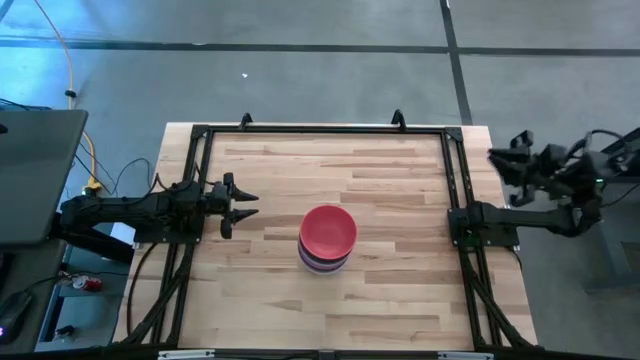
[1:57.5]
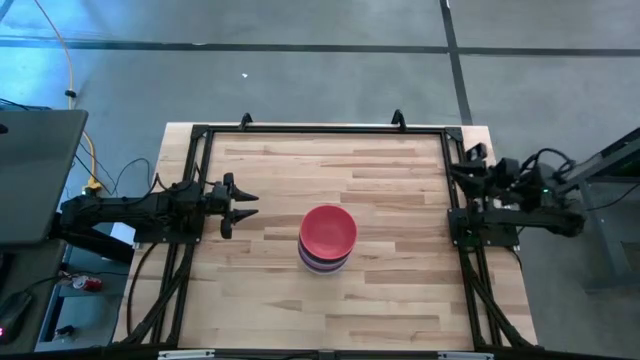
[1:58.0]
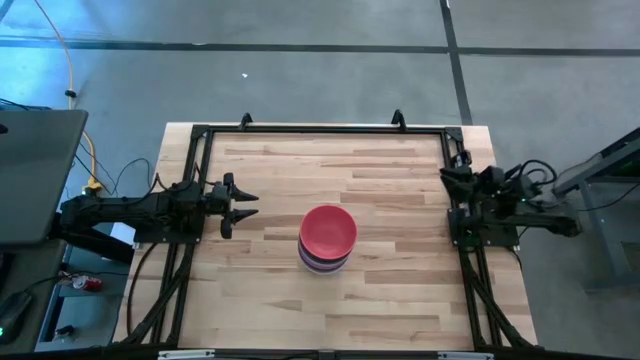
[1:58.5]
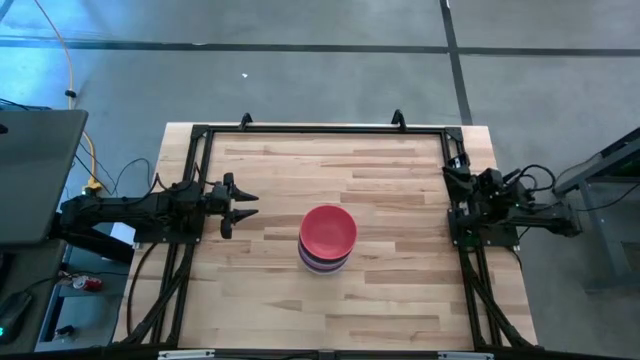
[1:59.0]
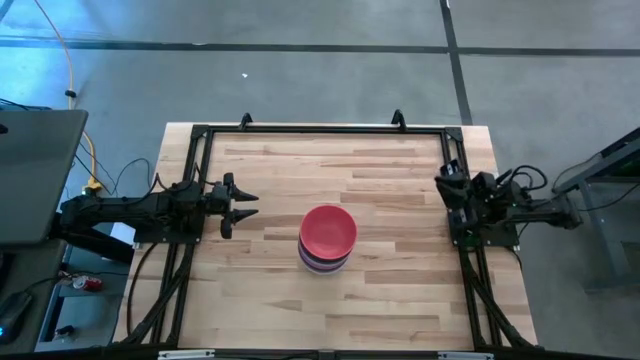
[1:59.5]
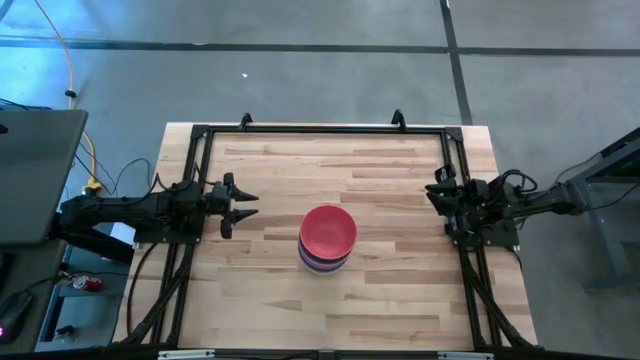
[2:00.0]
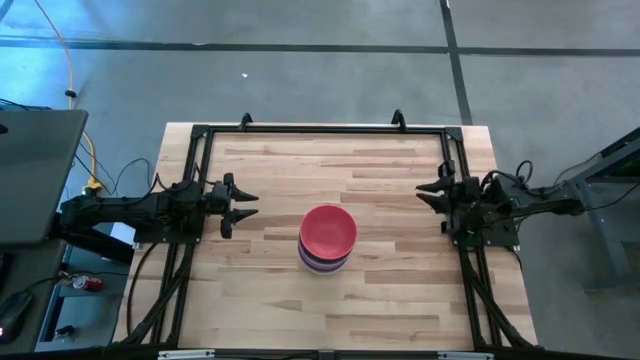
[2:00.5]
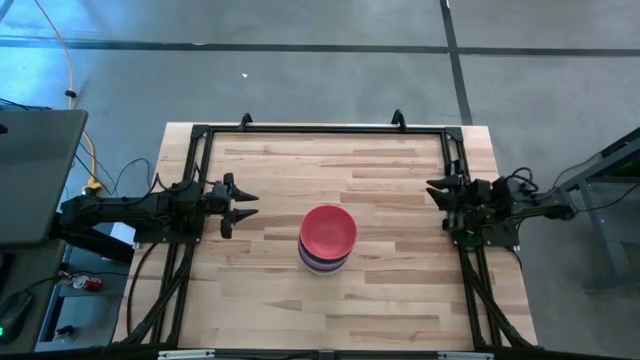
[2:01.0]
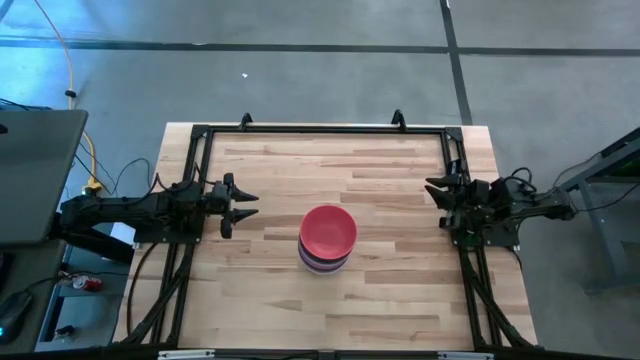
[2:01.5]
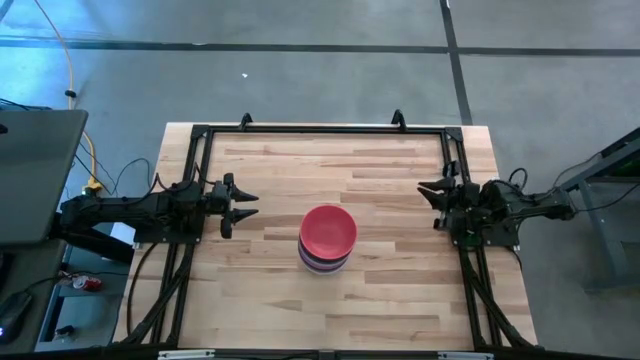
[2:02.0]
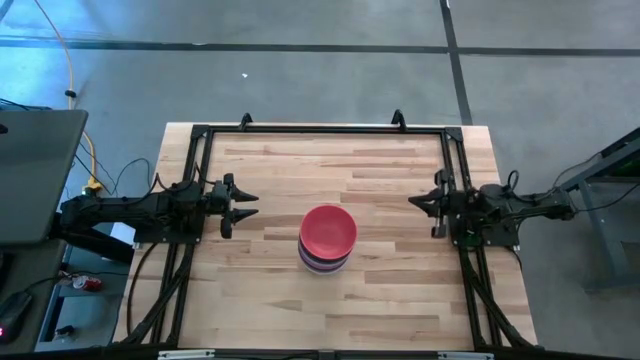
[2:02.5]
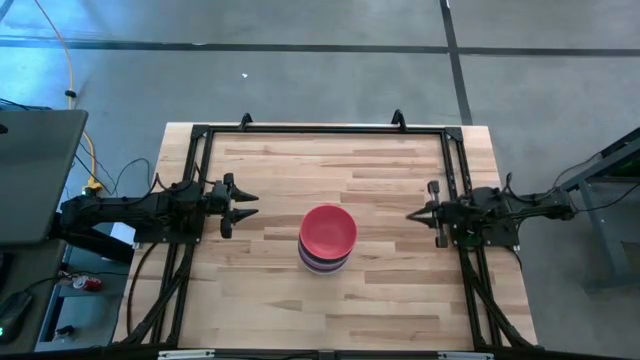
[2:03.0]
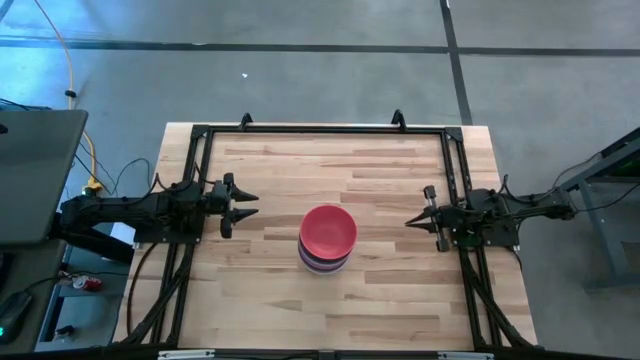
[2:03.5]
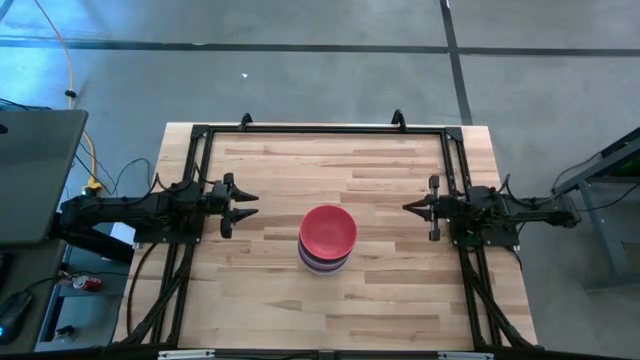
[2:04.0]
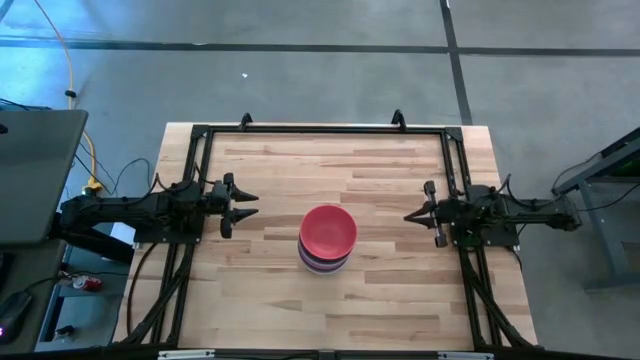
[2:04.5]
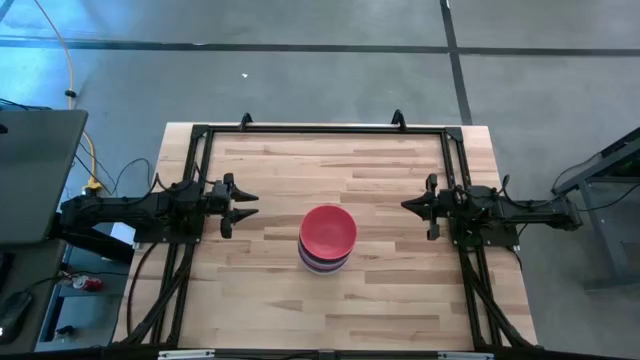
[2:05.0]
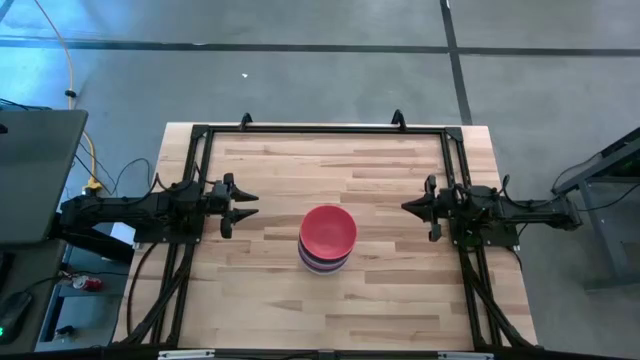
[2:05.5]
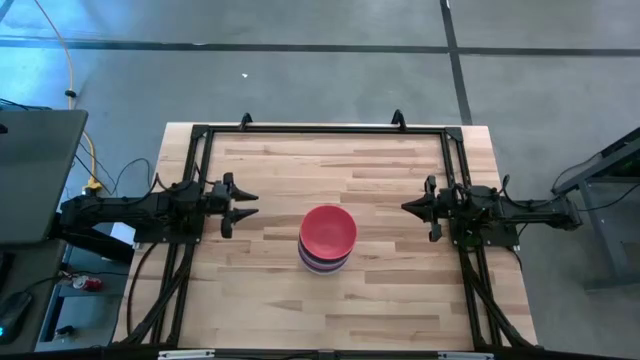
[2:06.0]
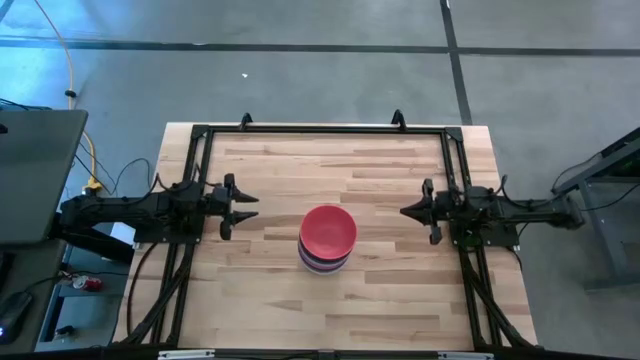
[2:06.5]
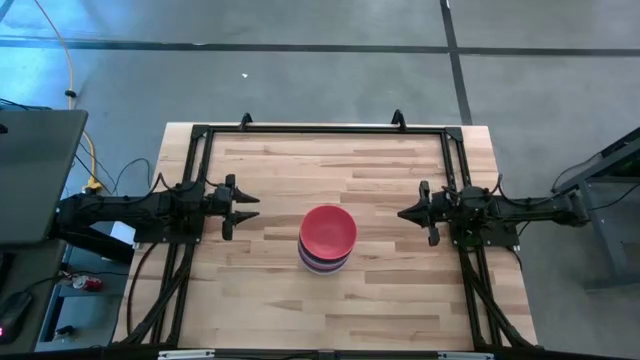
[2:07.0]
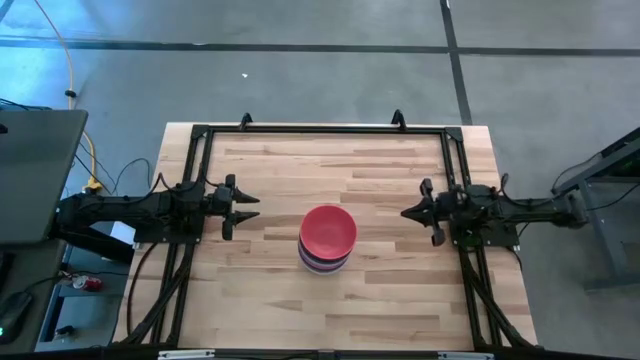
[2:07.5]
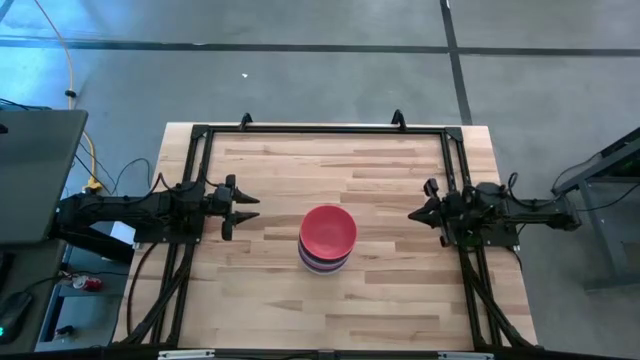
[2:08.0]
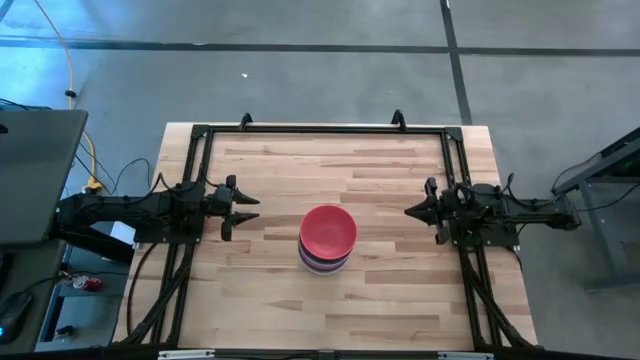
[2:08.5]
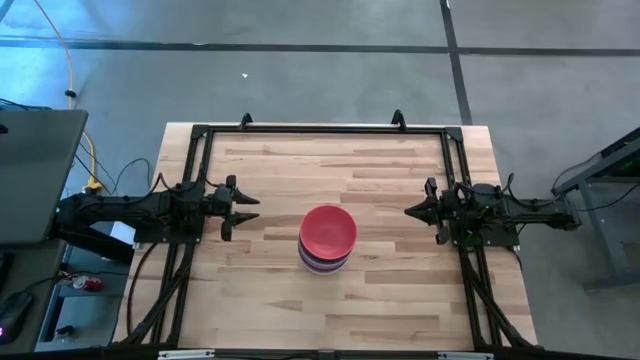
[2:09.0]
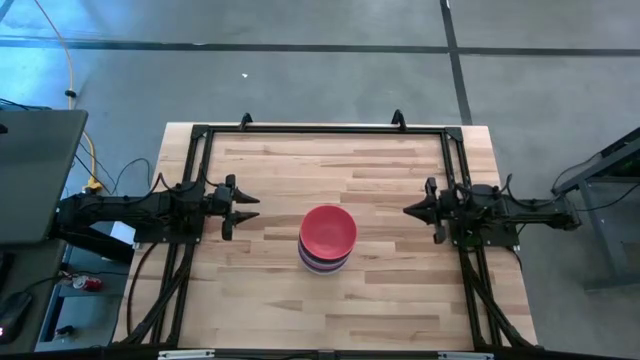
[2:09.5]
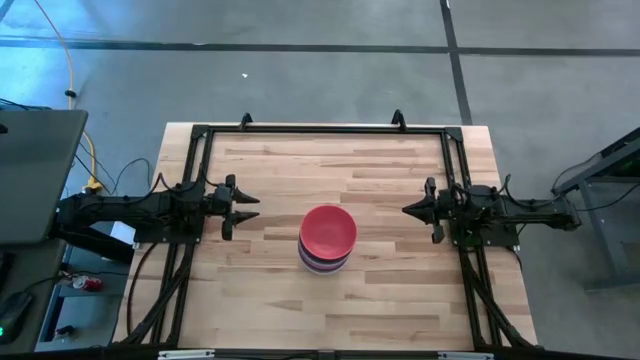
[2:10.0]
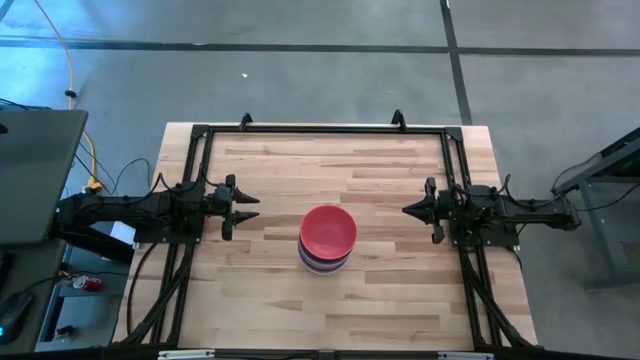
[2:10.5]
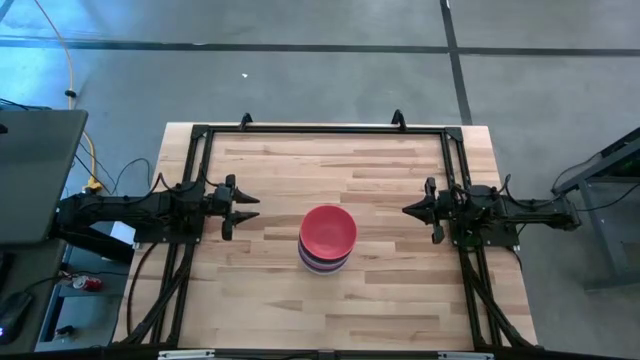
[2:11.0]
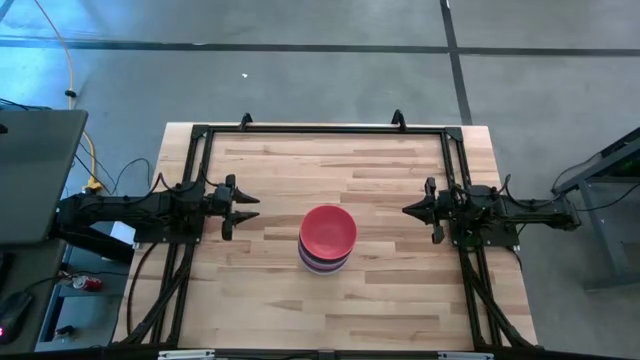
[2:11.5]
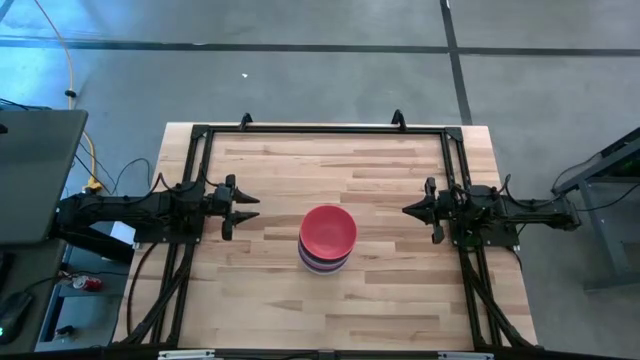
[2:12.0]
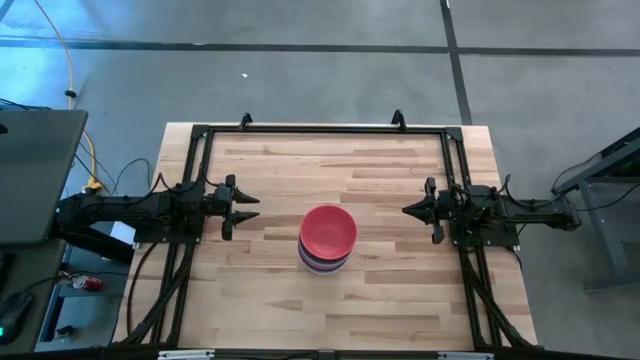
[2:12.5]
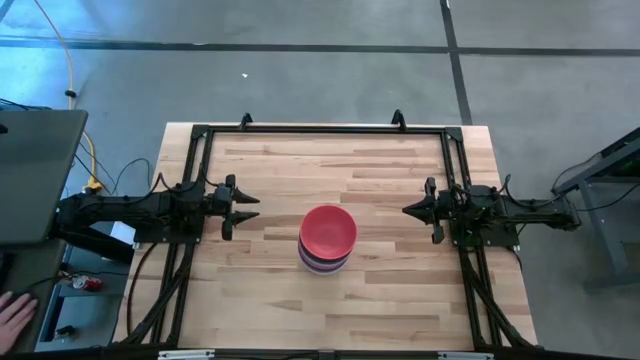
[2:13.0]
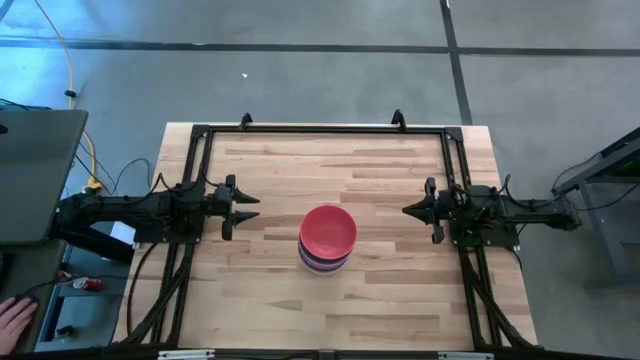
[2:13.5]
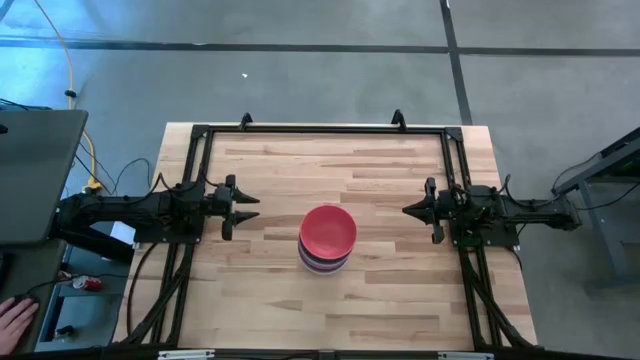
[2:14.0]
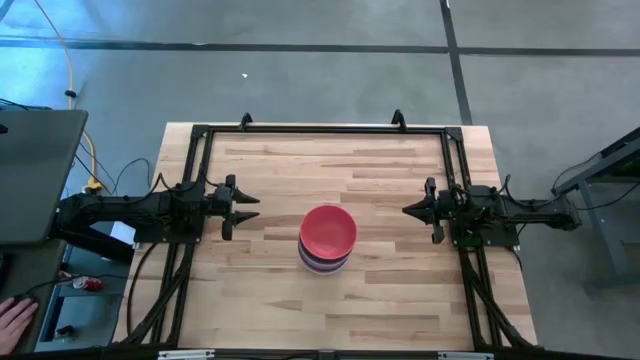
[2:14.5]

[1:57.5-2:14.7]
Task: Nest bowls inside each other
Return to Home Position

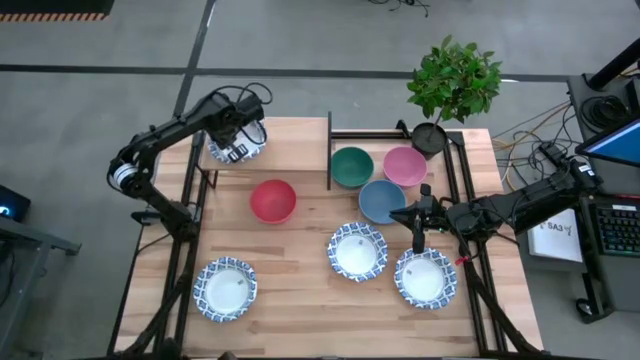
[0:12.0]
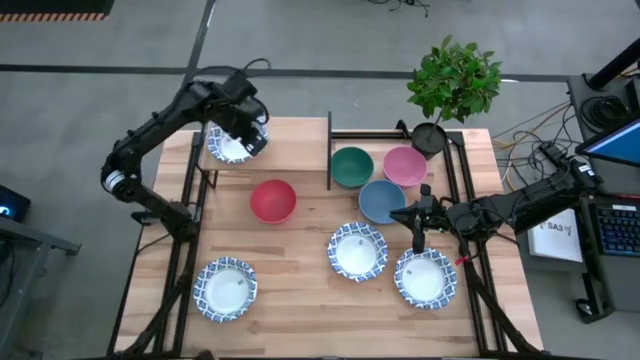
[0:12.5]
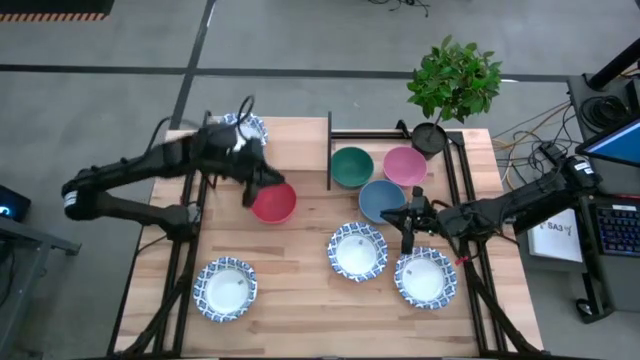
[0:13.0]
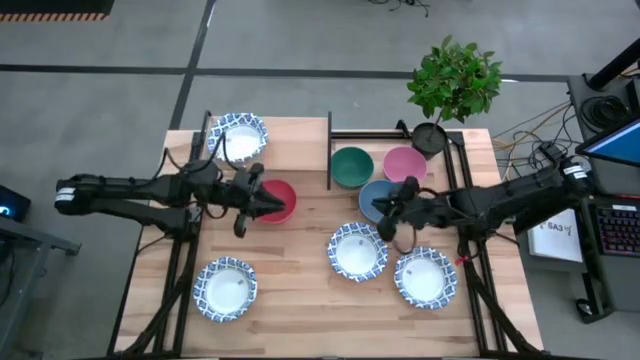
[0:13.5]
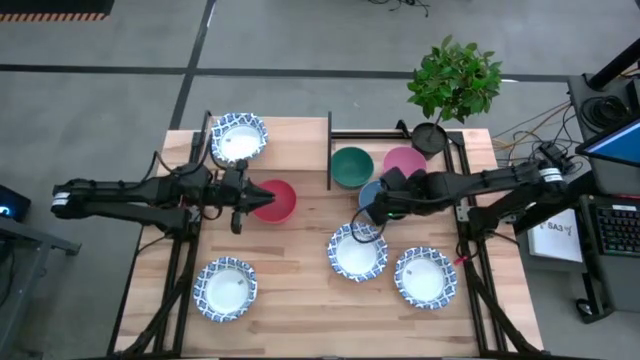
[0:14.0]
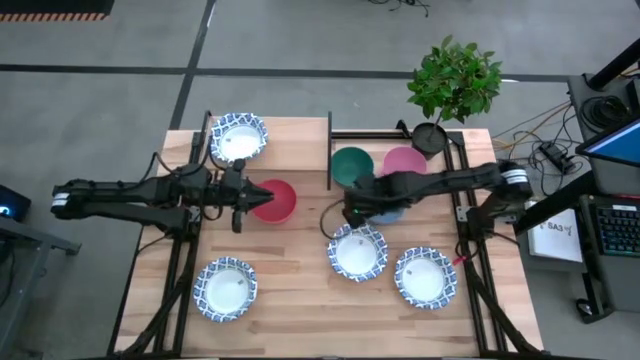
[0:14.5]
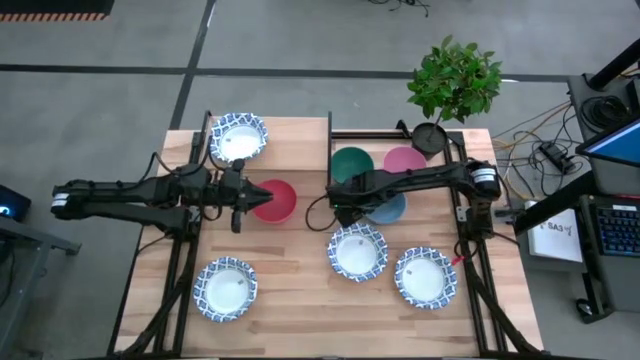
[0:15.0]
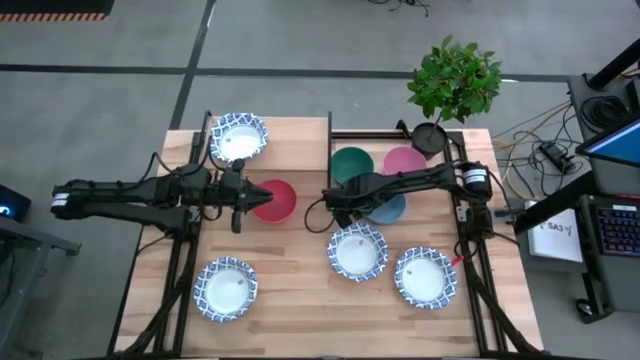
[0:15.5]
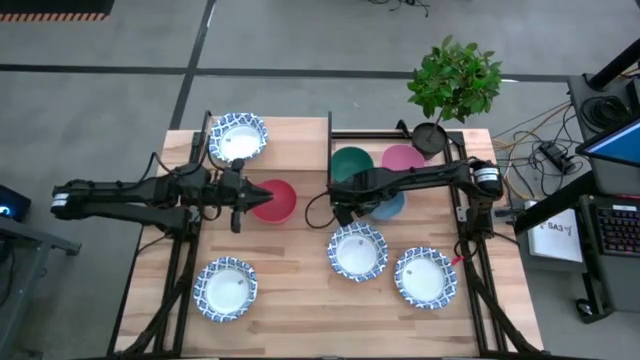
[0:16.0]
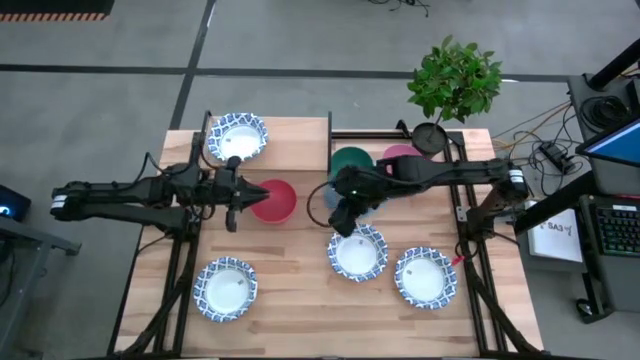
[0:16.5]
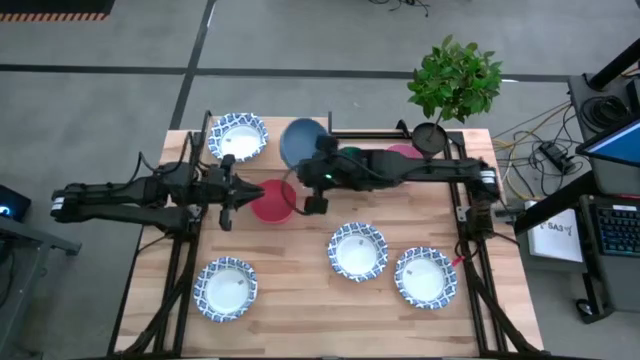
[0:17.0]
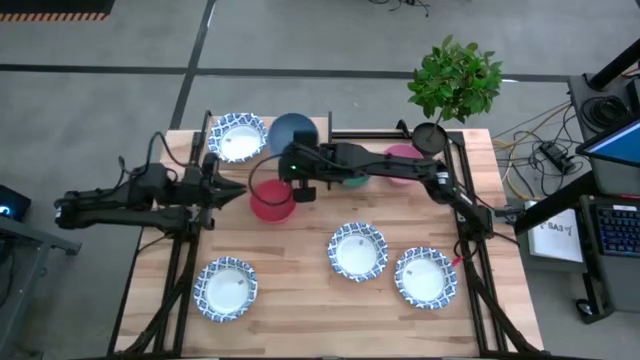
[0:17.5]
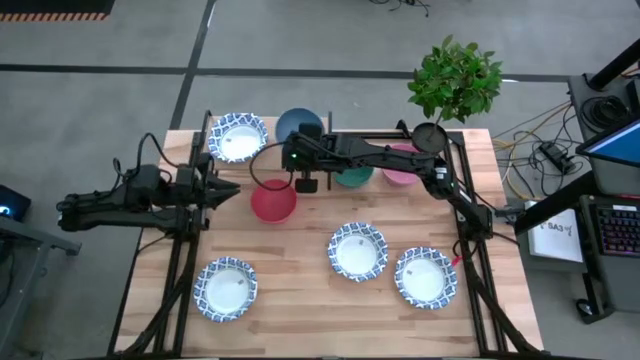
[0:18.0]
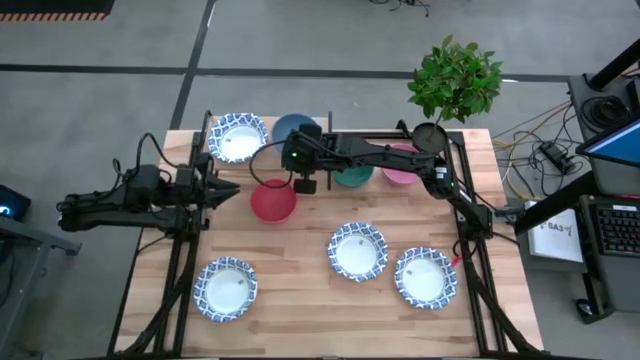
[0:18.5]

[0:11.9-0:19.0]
Task: Place and stack bowls onto a shelf
Put the blue bowl on the shelf
